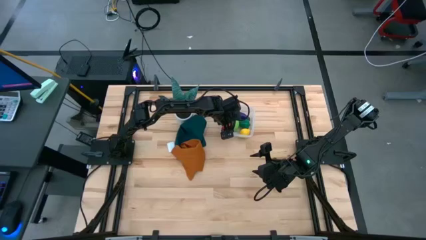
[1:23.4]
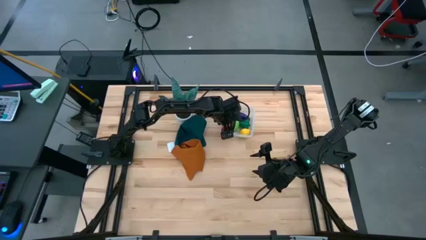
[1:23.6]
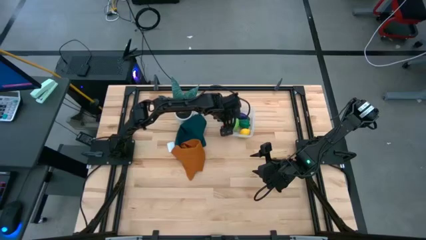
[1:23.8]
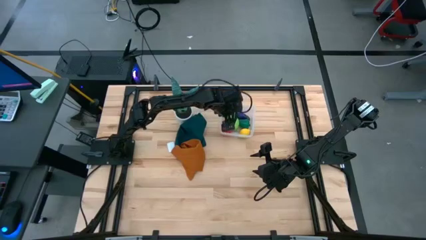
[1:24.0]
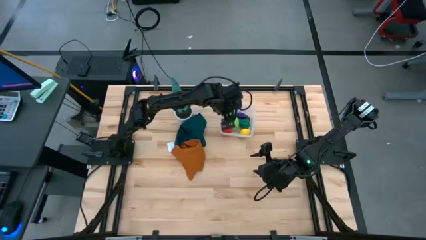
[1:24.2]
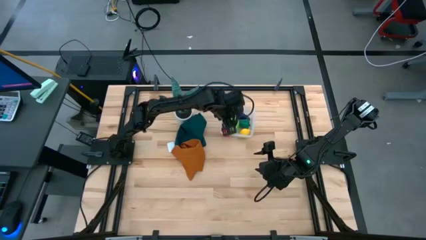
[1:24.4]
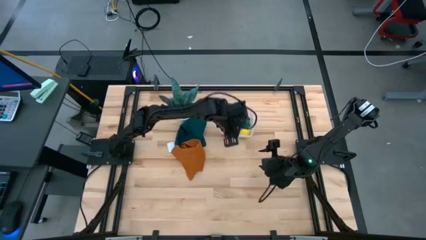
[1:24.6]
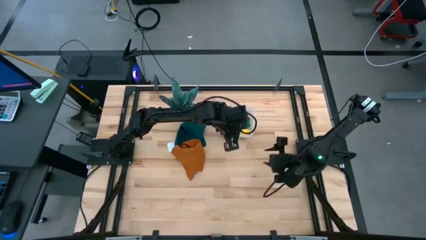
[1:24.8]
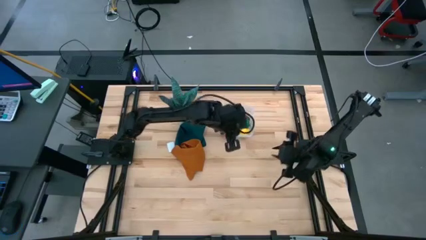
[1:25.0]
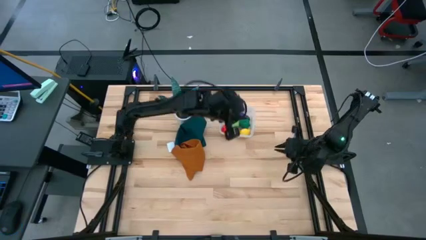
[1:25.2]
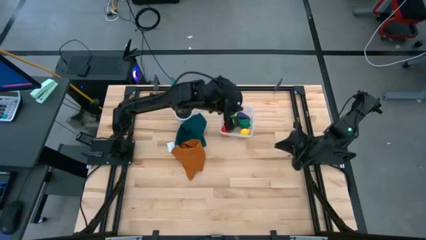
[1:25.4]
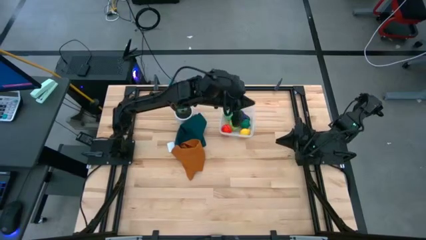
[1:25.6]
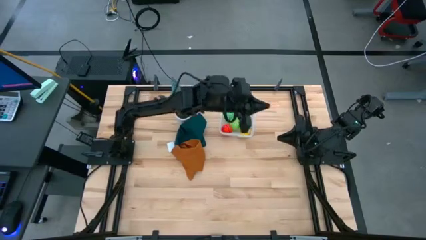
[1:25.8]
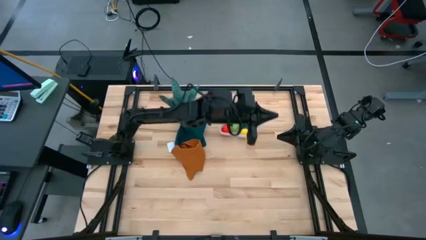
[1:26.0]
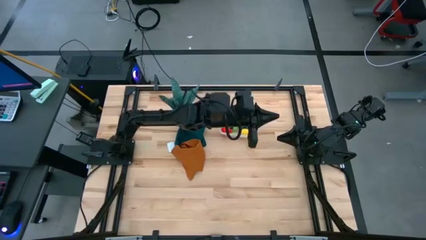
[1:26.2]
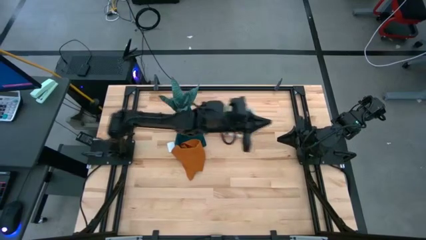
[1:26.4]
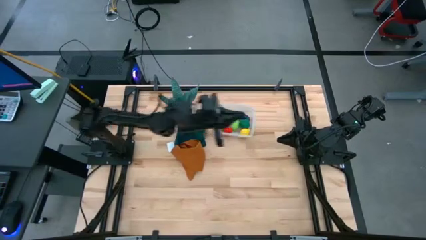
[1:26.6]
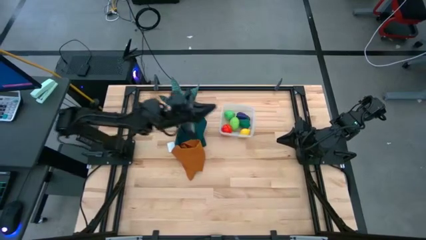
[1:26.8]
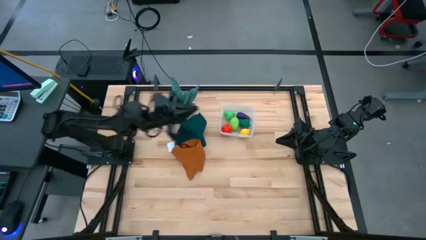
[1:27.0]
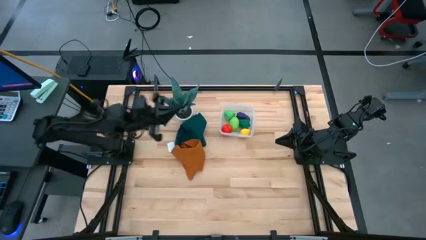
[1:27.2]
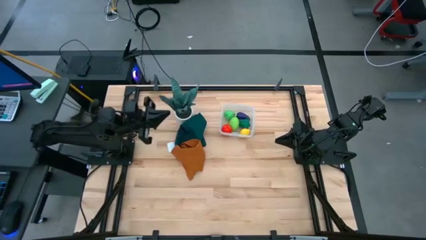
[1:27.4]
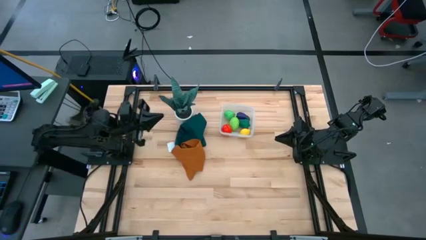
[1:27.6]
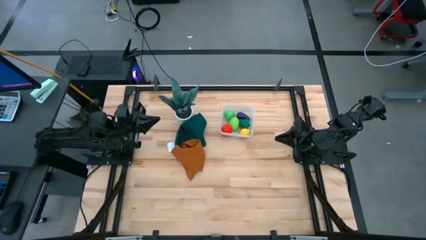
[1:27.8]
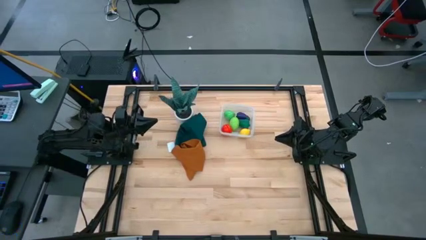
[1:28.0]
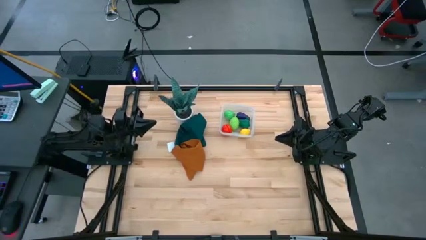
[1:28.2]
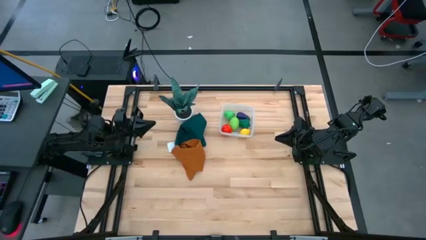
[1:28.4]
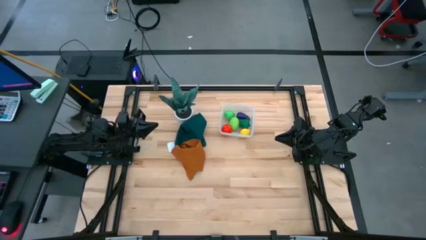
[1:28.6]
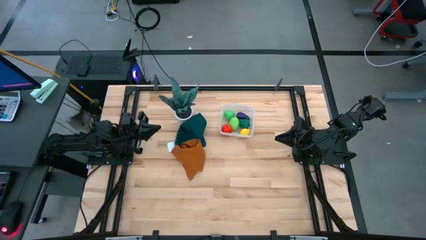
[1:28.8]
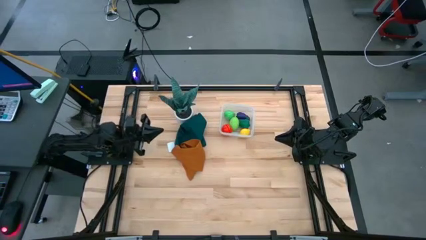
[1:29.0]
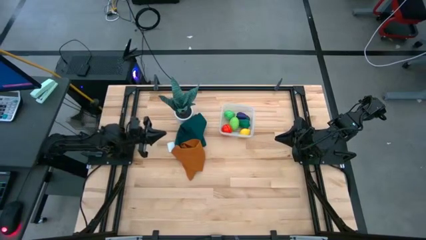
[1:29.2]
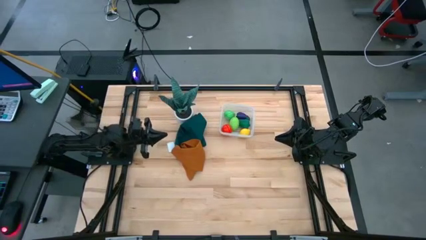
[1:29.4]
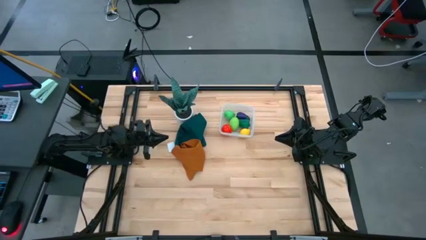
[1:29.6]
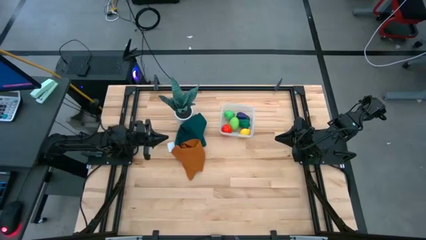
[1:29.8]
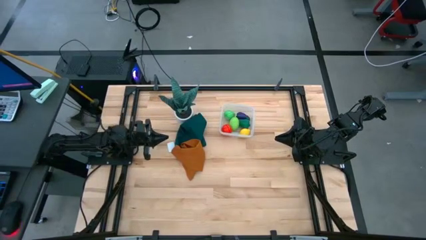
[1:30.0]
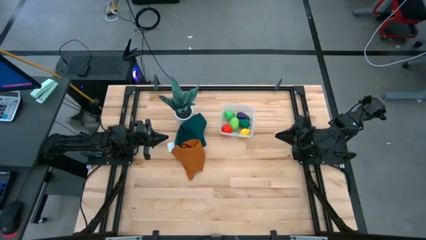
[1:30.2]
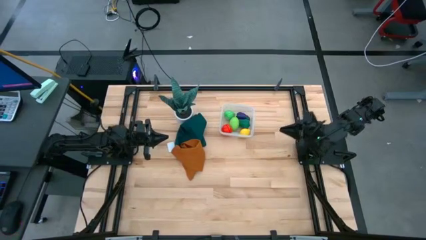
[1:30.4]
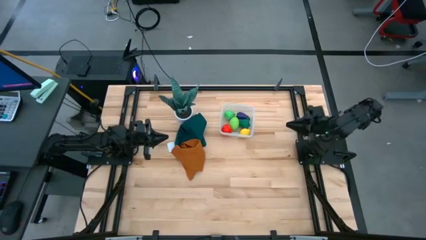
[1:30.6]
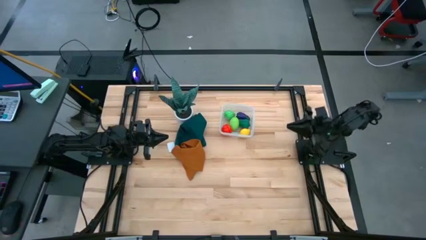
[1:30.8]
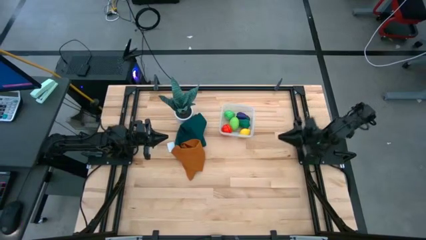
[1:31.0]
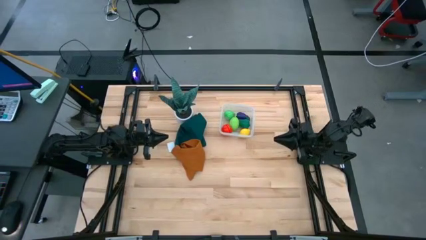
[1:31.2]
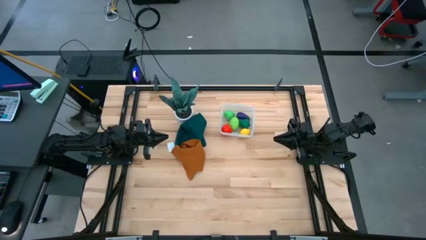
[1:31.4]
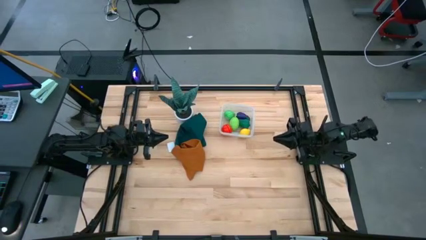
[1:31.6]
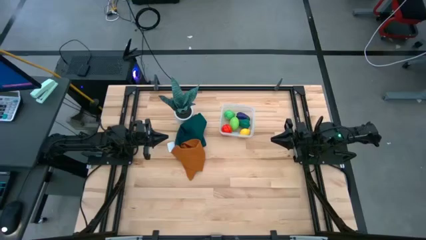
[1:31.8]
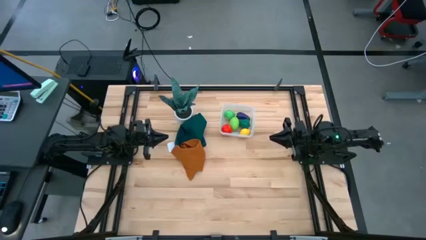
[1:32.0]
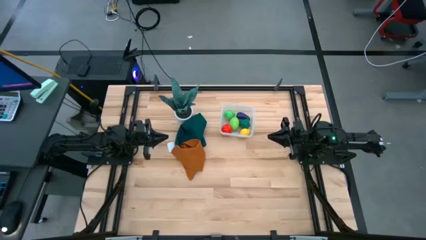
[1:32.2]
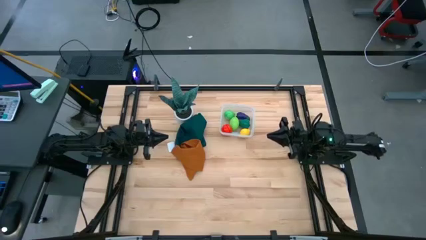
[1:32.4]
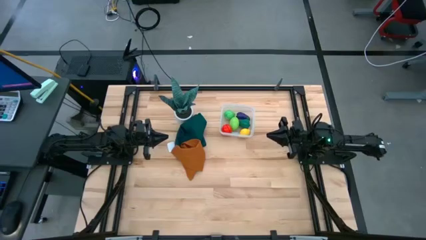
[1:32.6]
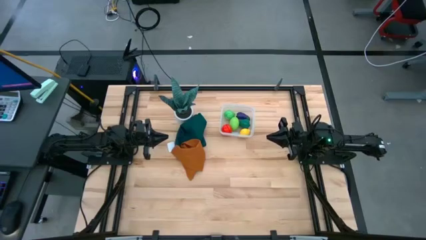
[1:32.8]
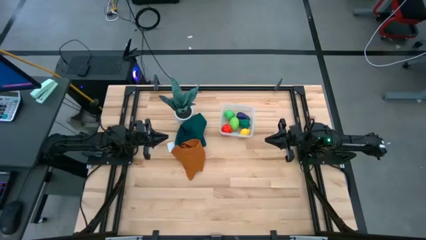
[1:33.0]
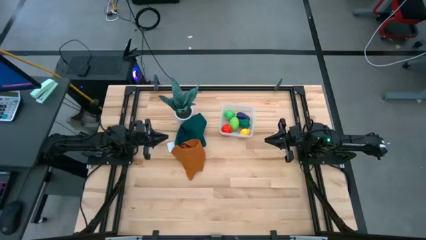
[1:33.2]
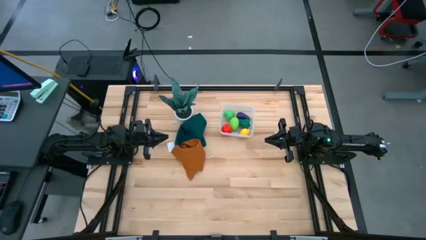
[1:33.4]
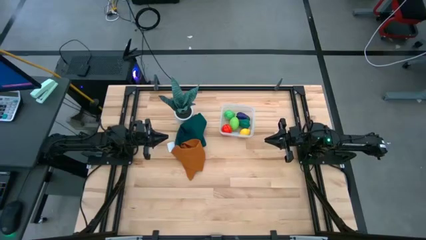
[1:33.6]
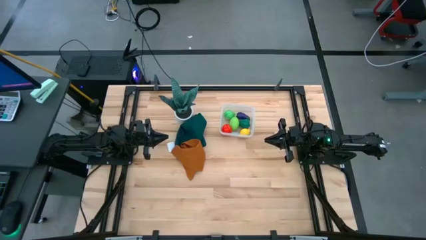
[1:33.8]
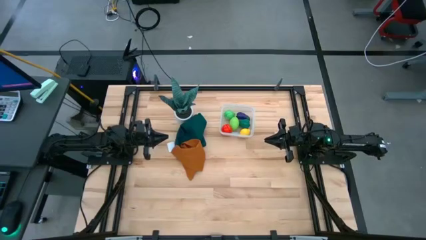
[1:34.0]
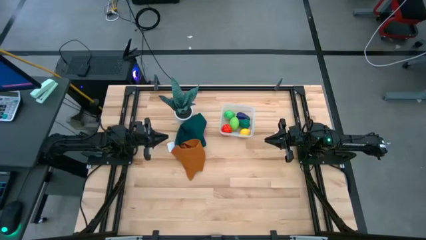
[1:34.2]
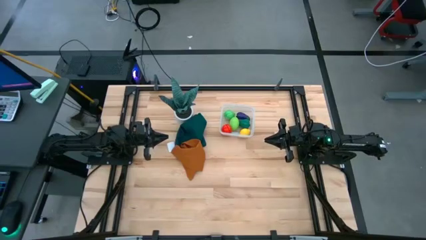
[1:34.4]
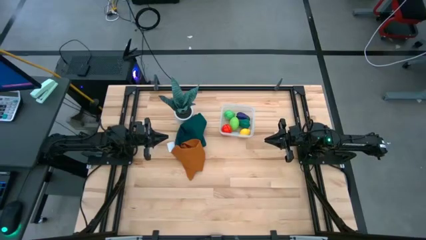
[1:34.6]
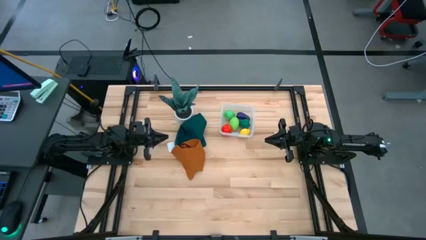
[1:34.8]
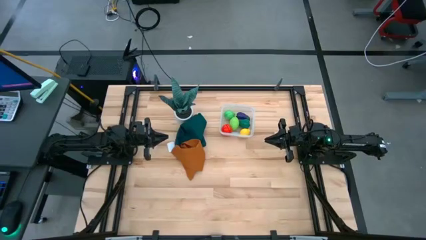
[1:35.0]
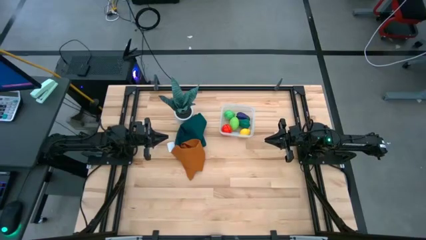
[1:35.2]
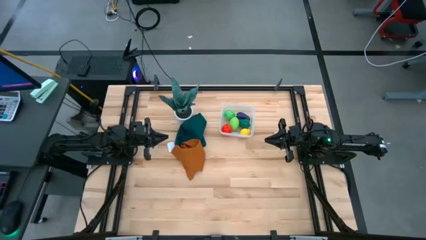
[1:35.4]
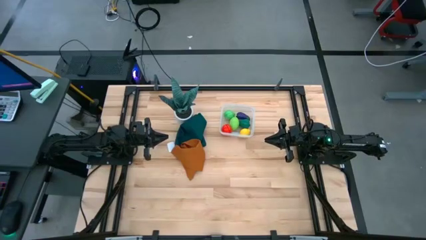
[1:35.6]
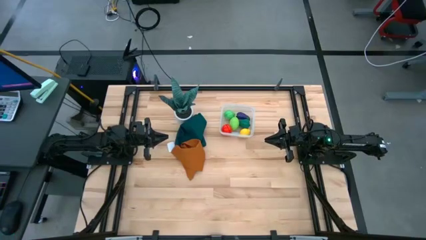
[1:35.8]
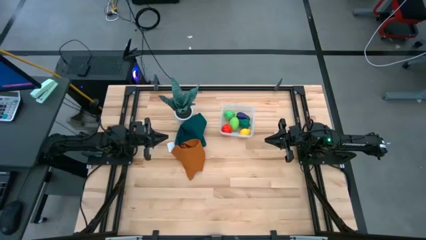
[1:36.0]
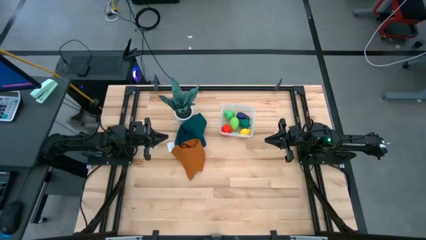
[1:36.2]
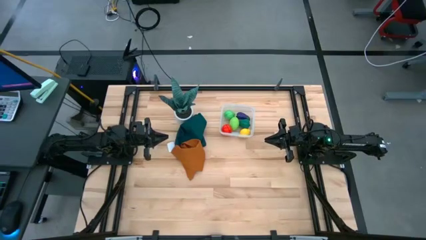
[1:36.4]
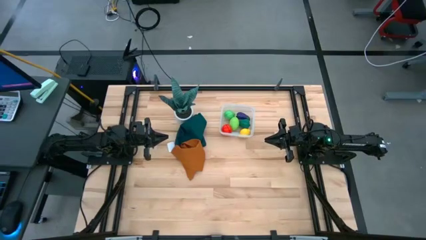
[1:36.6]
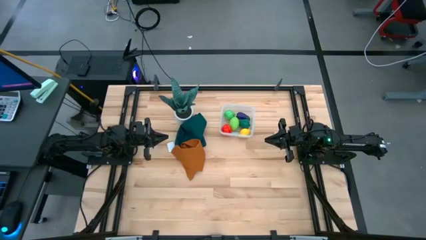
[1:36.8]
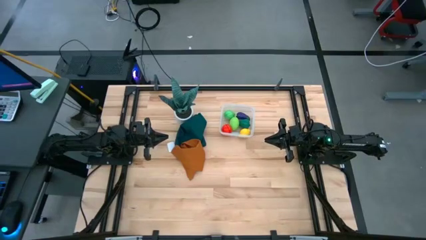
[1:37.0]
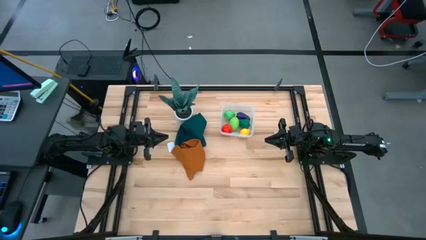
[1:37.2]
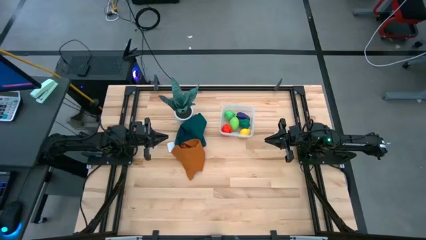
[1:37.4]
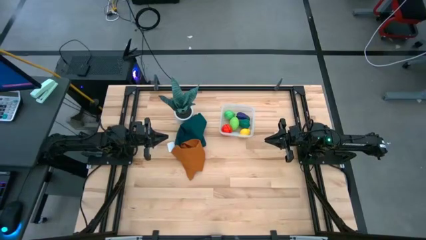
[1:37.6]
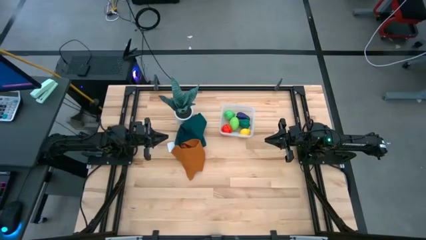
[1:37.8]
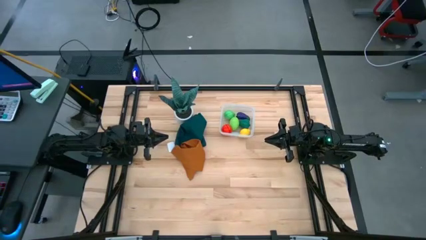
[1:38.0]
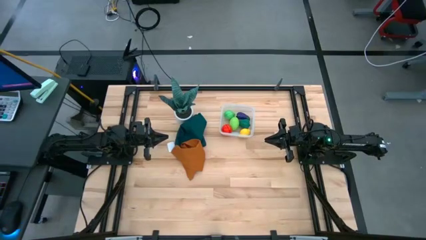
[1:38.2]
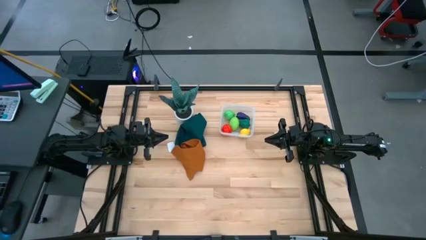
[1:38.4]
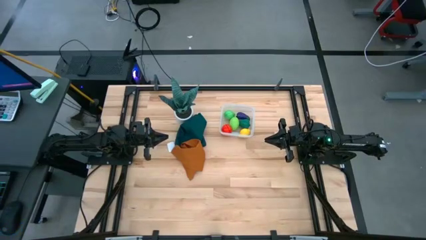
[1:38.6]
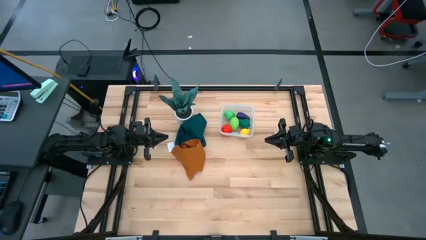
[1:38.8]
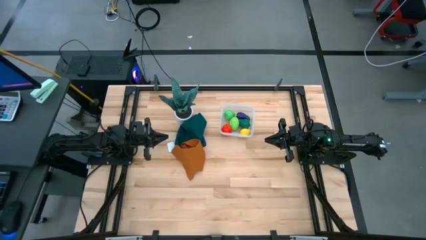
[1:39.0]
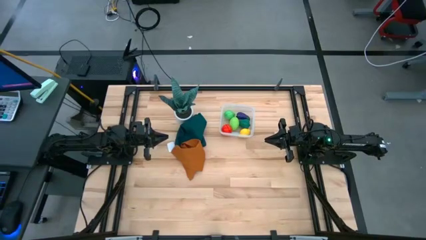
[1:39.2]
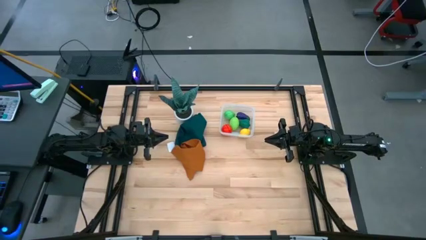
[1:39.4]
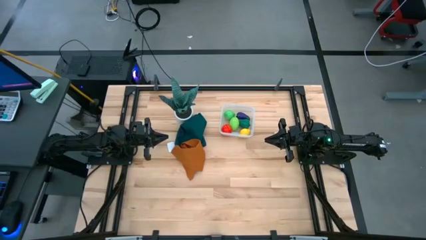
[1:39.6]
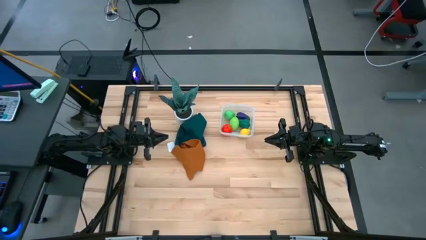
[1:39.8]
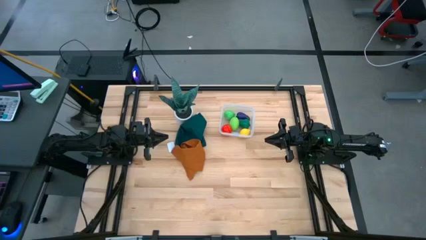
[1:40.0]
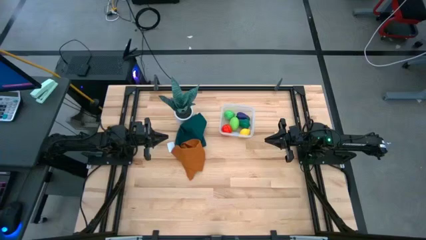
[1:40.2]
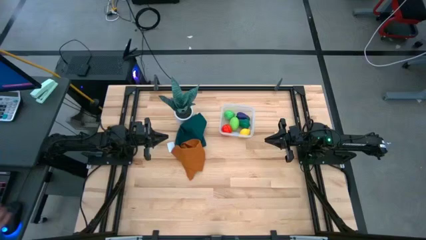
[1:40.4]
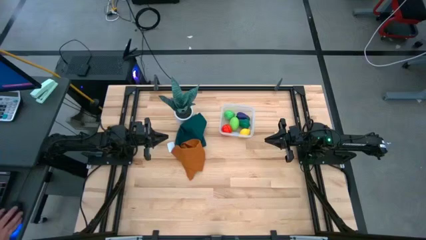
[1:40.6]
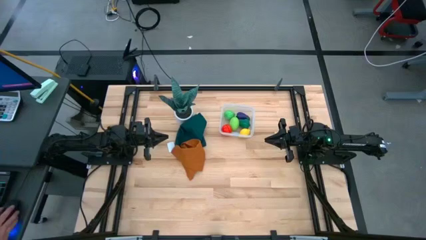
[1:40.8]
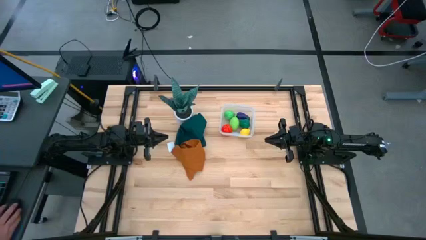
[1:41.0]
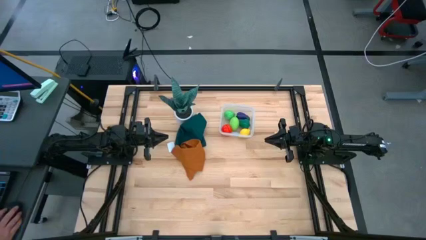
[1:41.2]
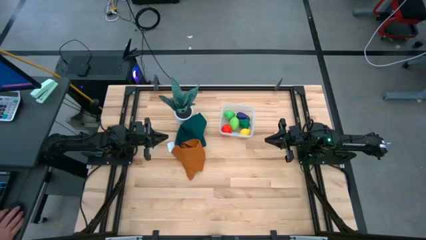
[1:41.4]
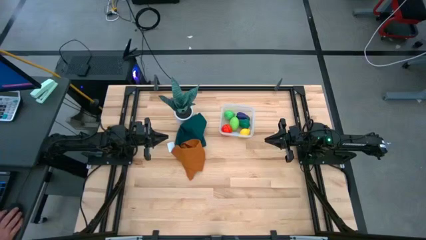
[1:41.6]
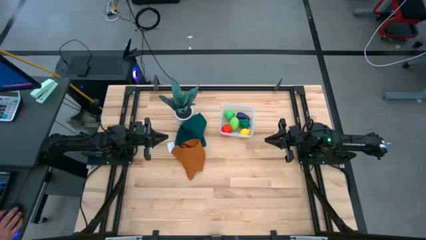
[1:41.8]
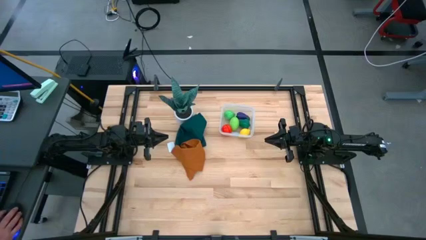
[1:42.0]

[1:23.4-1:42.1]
Task: Pick and placing Produce into tupperware
Return to Home Position
